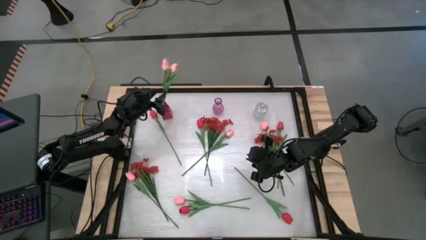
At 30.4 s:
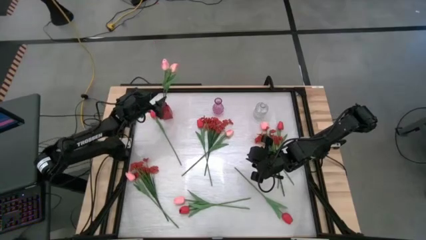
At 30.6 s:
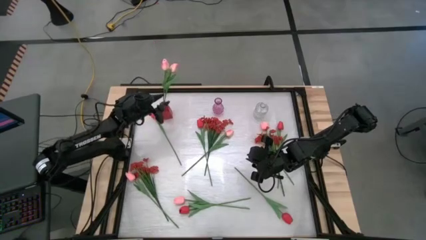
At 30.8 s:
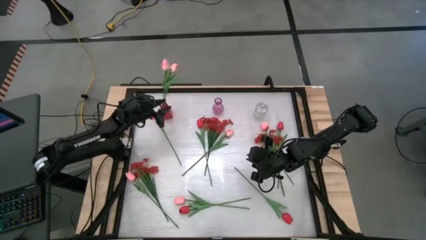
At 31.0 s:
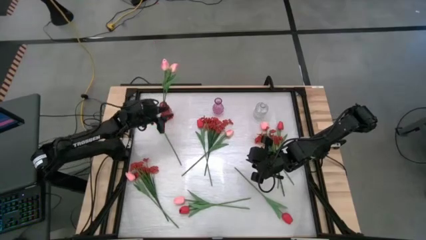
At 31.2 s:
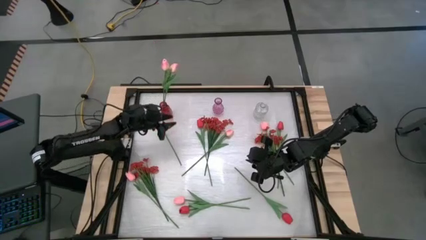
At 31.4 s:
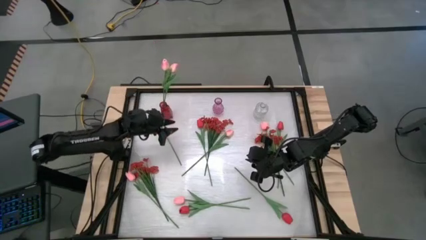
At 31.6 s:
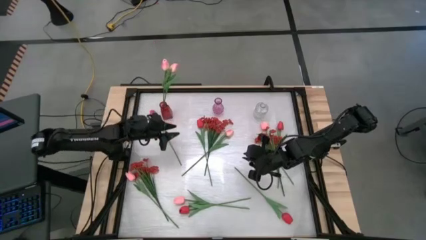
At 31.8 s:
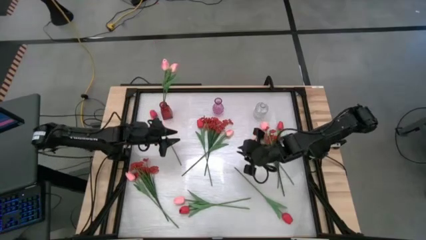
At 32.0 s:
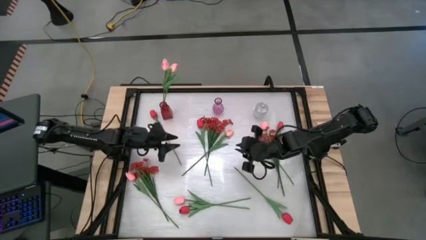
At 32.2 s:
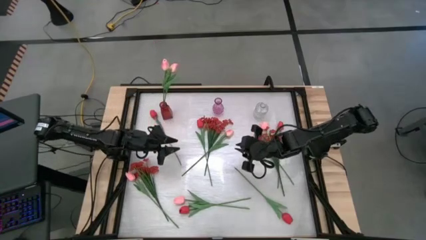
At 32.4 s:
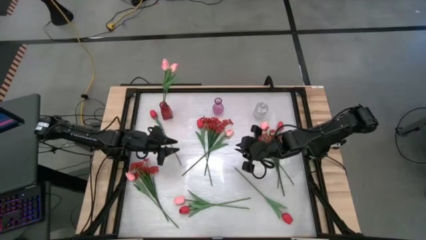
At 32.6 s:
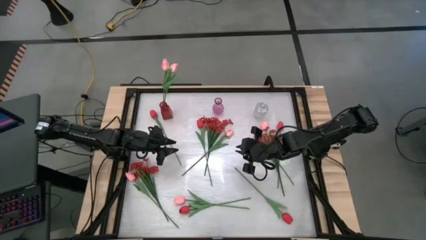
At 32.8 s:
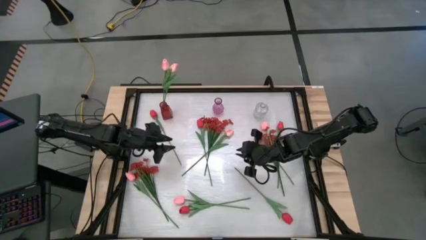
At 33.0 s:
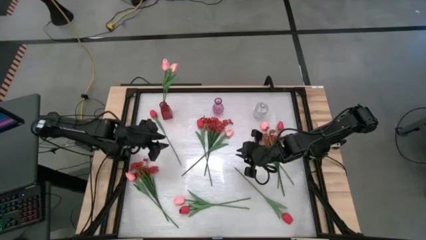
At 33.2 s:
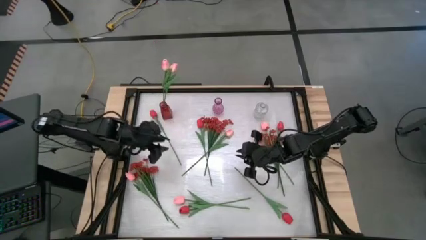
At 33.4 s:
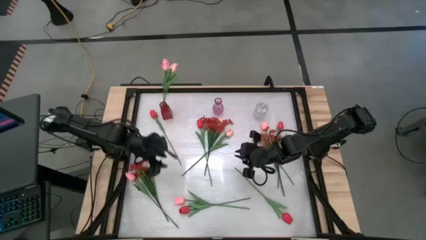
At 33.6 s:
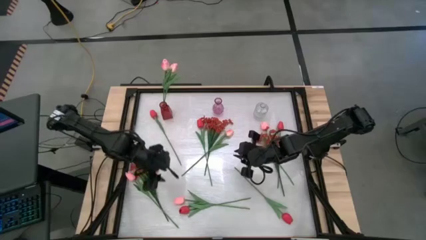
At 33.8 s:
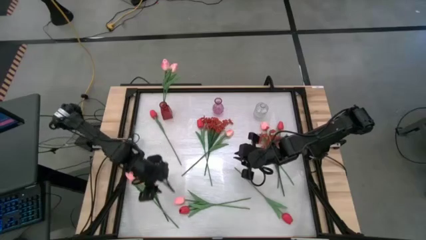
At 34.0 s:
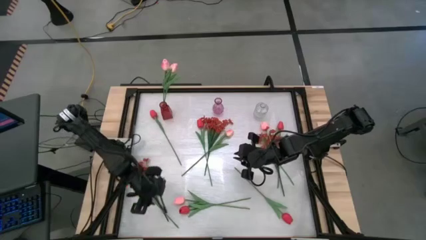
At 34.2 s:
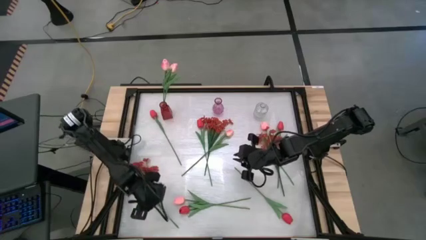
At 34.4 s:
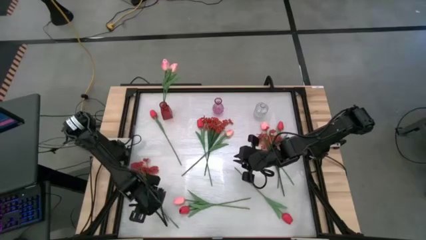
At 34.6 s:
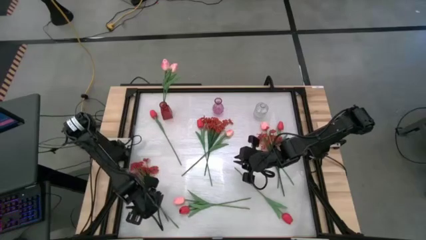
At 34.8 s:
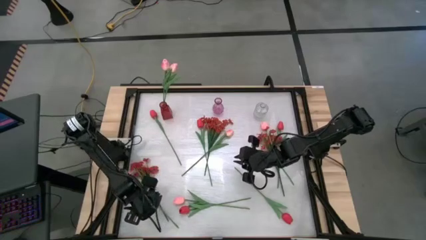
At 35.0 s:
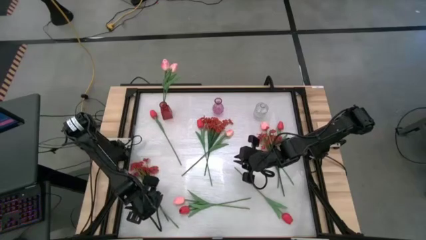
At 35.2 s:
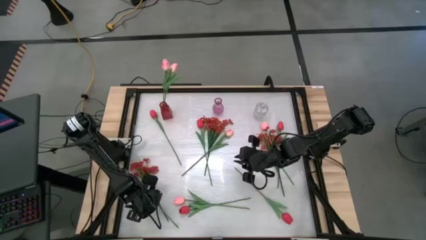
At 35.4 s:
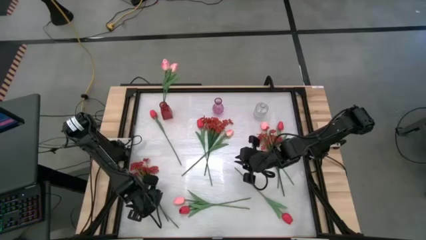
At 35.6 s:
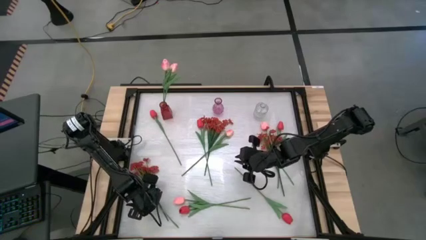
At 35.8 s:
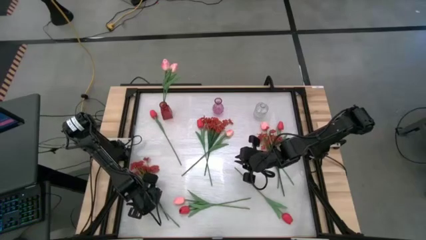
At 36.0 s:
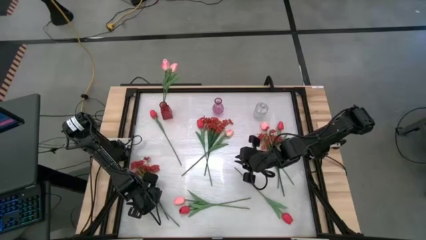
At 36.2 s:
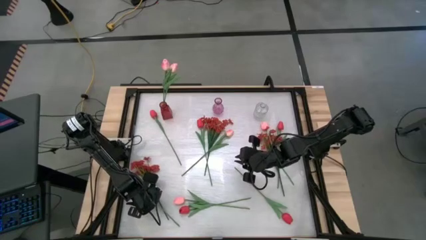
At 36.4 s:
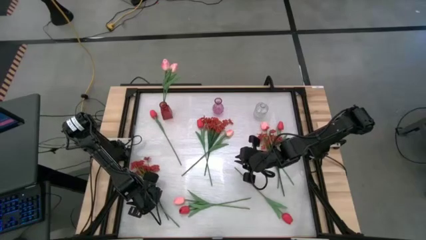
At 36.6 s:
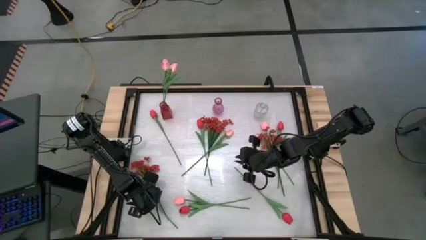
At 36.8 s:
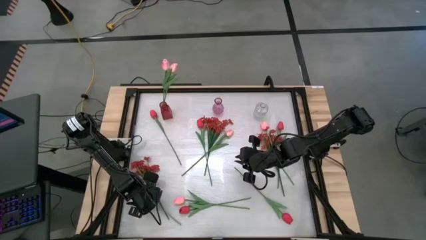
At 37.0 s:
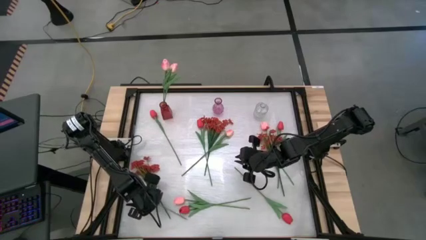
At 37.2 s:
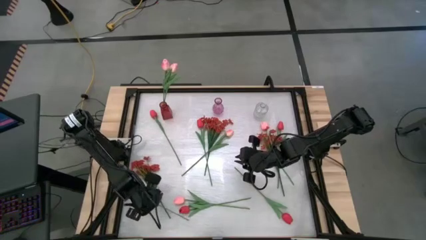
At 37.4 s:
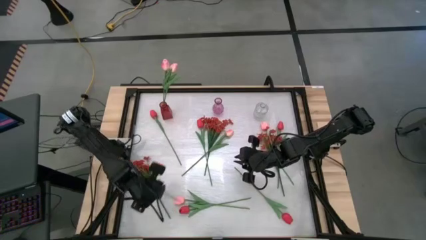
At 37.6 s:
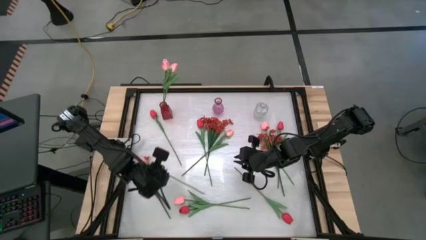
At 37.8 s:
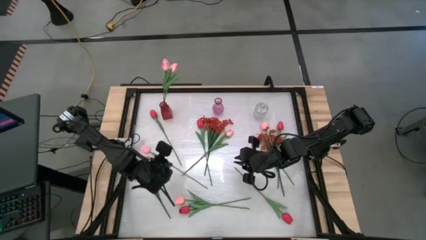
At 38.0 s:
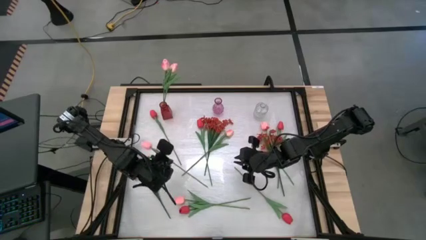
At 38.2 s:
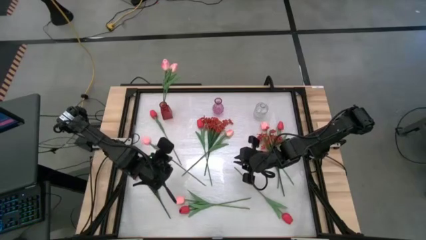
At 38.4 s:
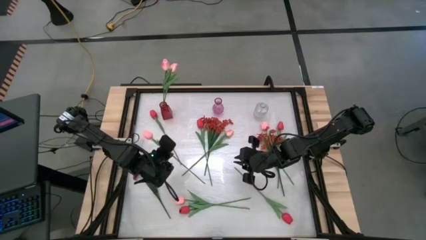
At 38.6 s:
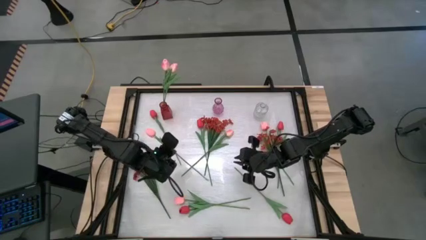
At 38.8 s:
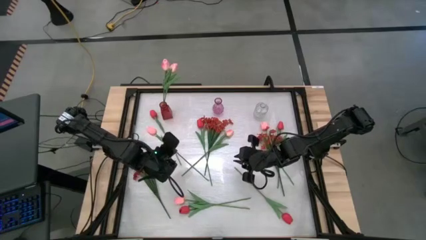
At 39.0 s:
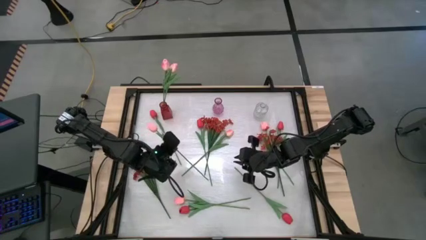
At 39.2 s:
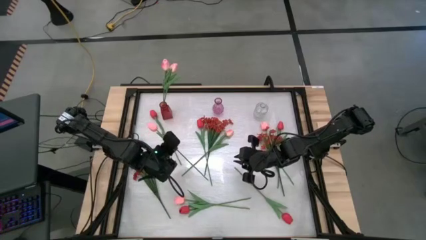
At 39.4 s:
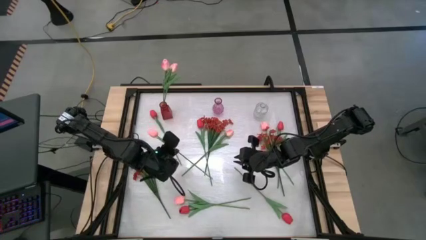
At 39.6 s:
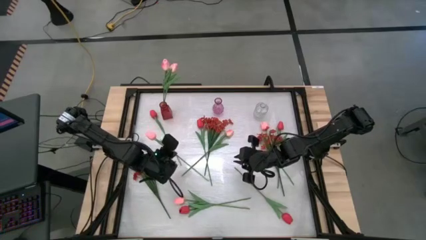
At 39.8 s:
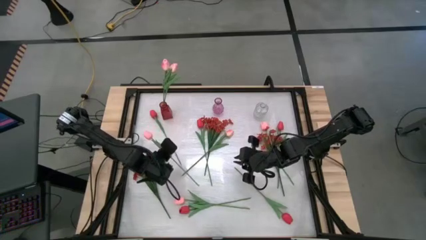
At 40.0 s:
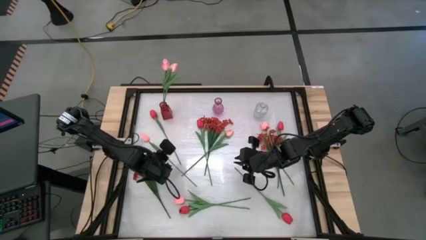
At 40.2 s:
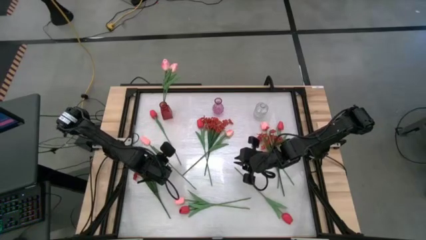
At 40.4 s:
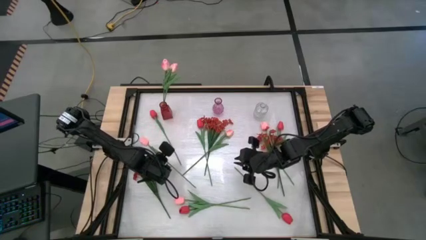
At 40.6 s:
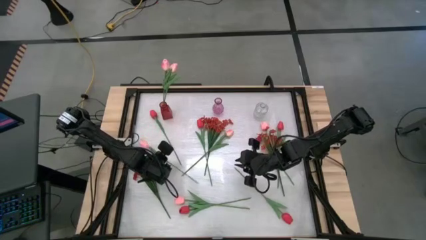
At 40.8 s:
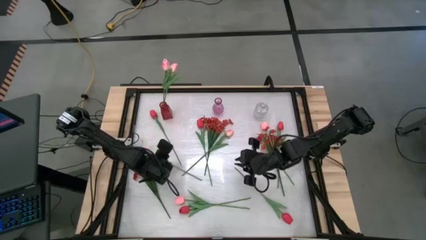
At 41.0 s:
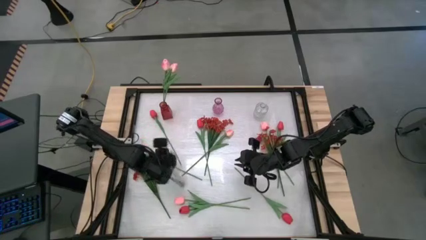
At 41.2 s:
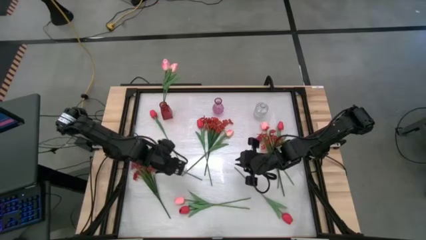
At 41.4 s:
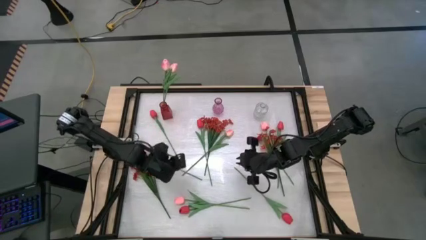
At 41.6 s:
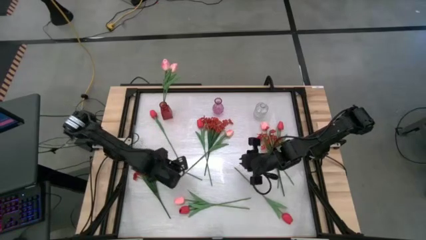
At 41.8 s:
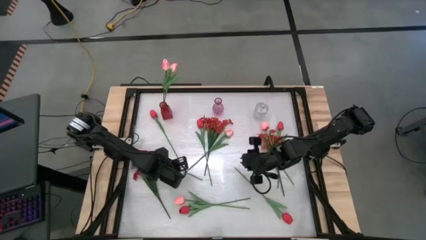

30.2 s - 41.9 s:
Task: Sort flowers into vase by color
Put the pink tulip into the red vase

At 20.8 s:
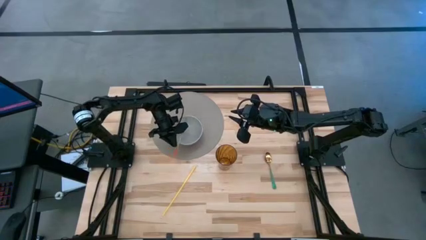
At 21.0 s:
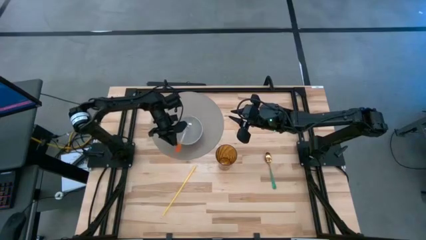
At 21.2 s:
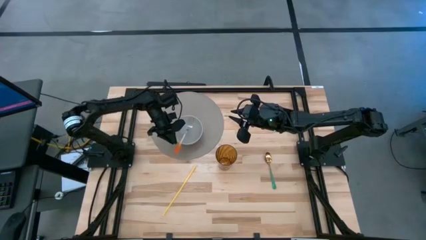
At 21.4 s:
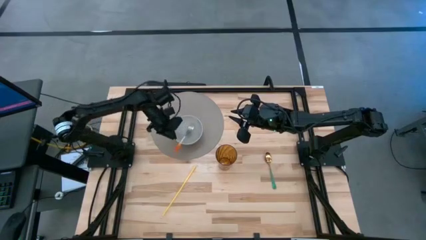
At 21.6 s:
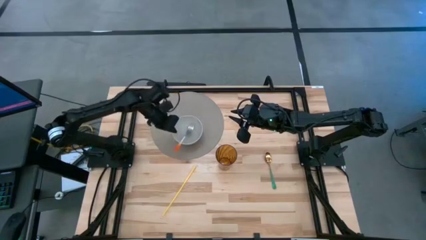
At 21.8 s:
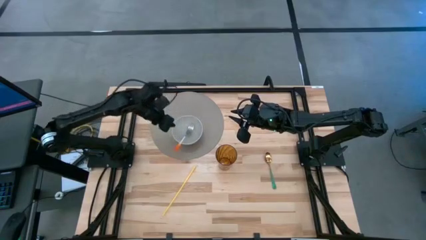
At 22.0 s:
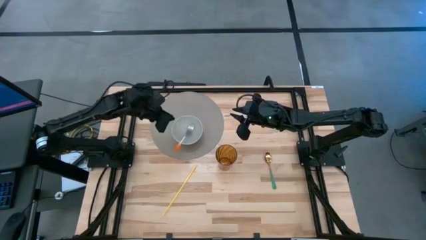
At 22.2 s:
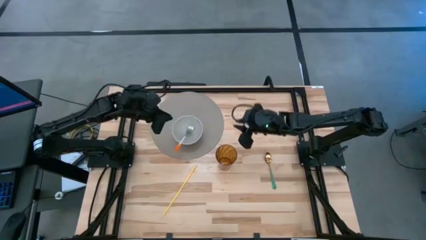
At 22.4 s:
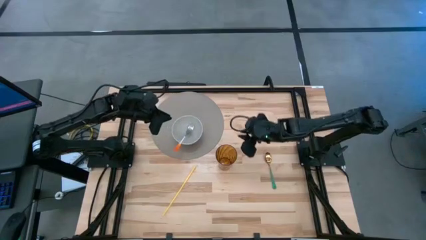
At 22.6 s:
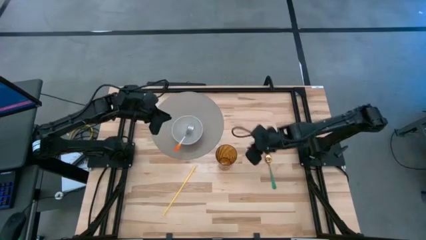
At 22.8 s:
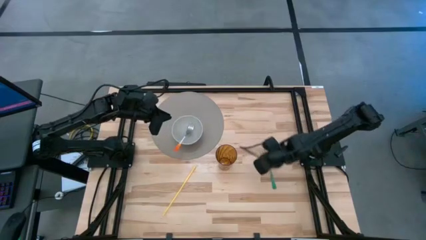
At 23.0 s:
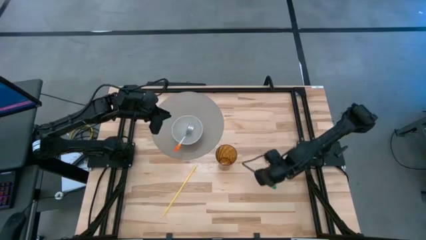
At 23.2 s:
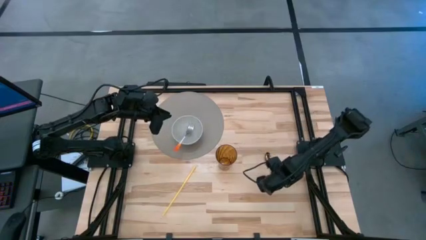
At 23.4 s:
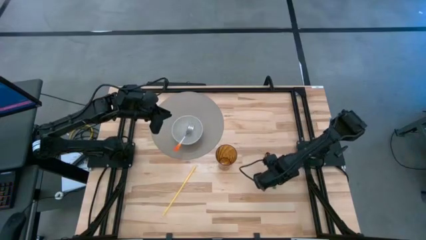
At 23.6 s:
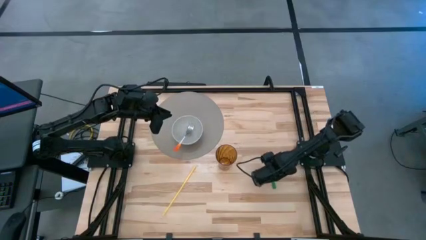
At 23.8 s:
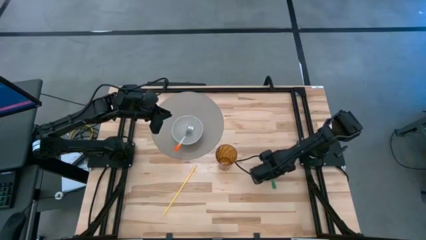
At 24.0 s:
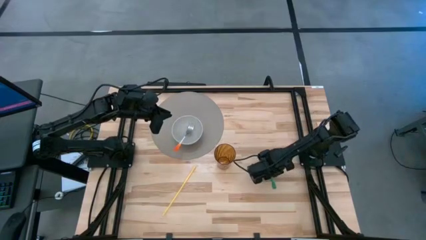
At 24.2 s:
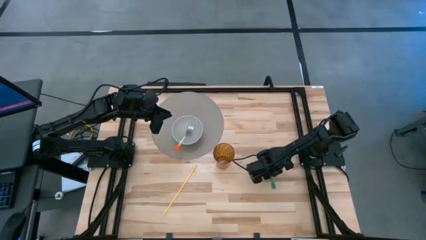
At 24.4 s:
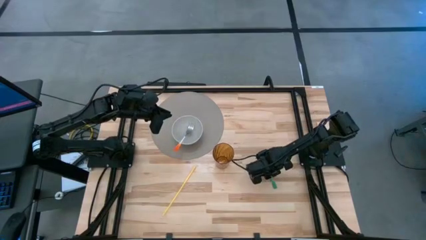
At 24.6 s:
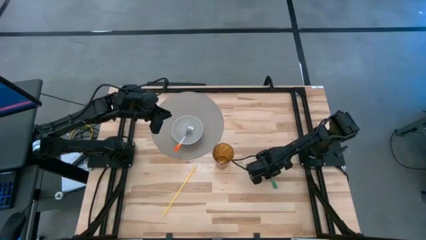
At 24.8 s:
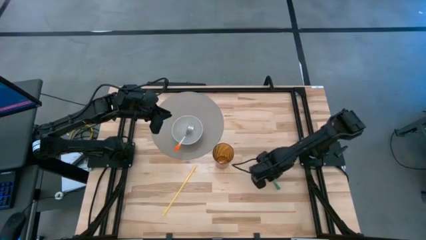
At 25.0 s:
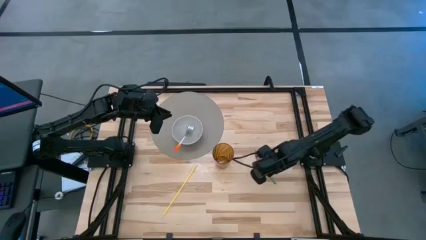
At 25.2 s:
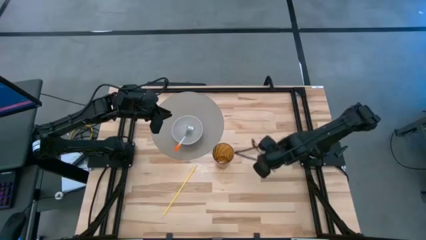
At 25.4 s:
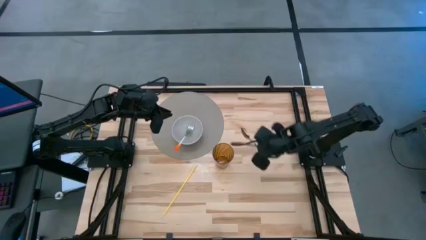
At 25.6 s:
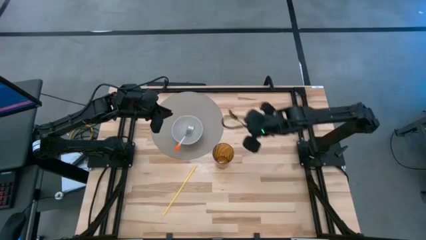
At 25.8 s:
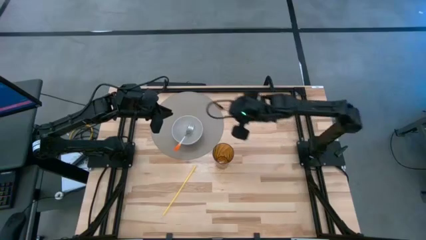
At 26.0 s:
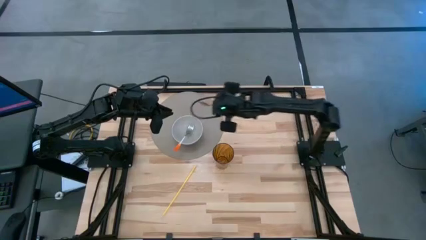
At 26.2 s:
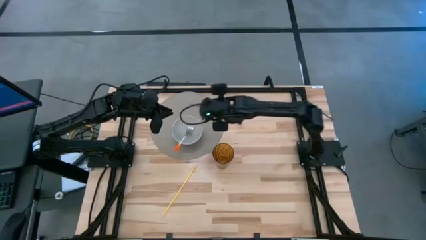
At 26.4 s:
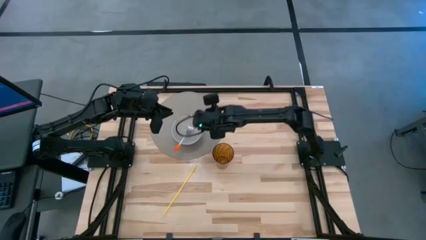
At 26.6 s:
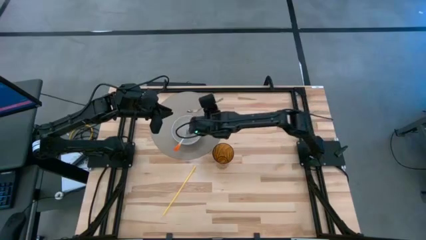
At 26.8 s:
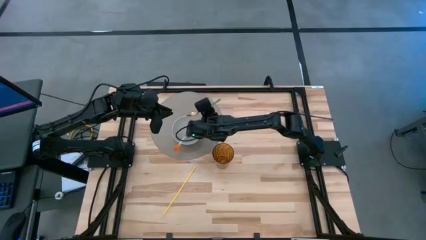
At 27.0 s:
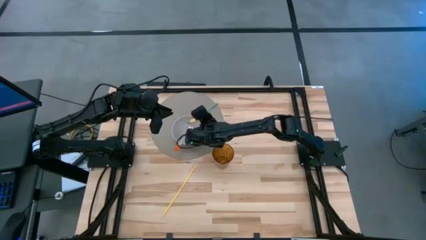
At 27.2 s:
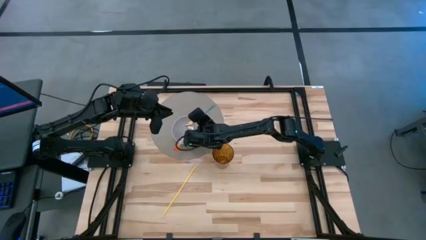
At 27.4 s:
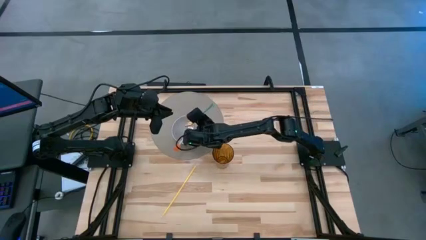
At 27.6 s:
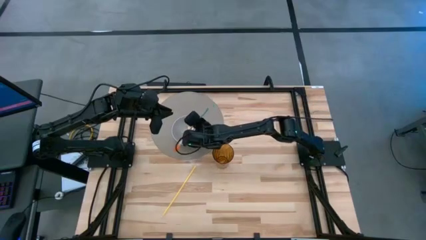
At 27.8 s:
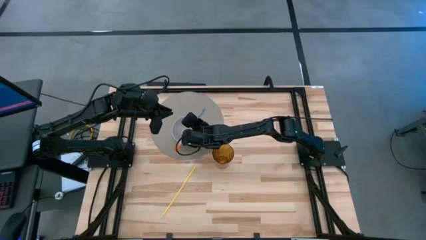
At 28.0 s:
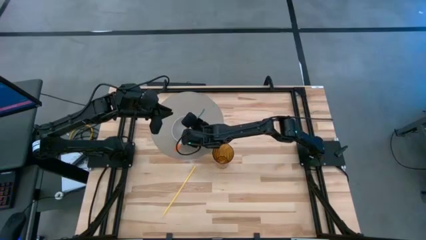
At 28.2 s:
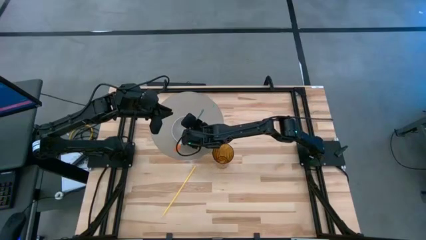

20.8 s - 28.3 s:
Task: Pick & Place Utensil
Put the spoon into the bowl on the table placemat
